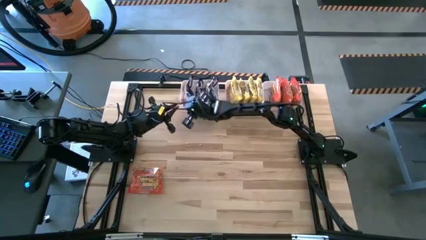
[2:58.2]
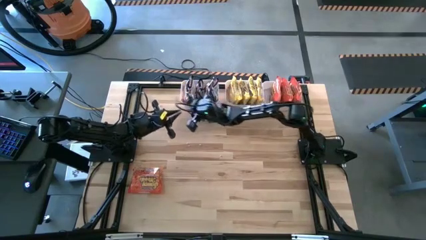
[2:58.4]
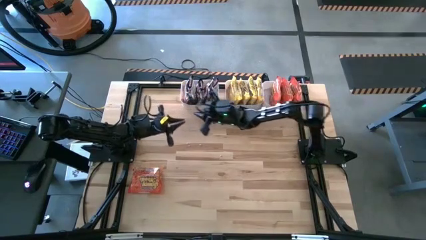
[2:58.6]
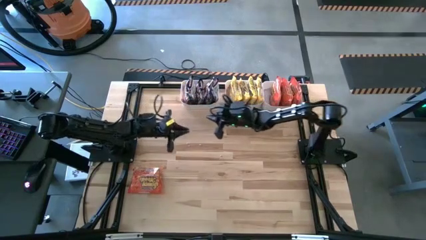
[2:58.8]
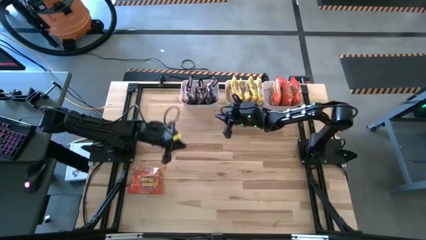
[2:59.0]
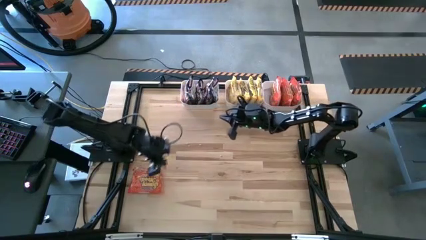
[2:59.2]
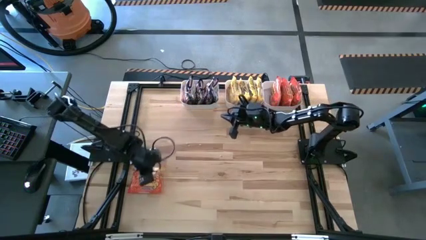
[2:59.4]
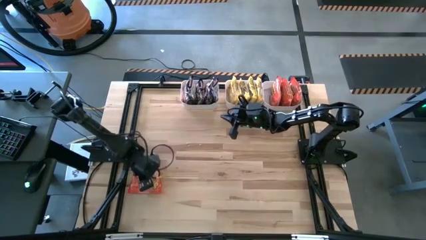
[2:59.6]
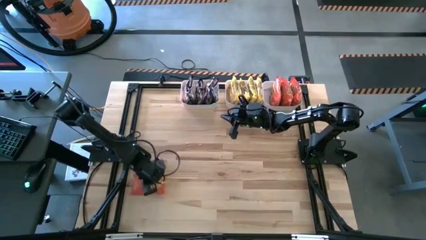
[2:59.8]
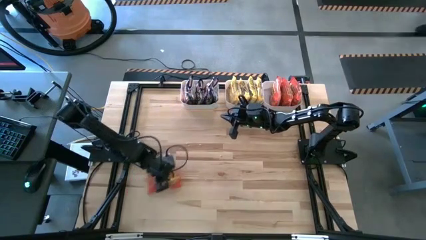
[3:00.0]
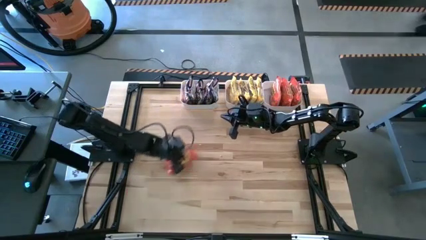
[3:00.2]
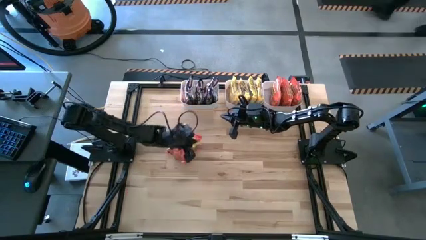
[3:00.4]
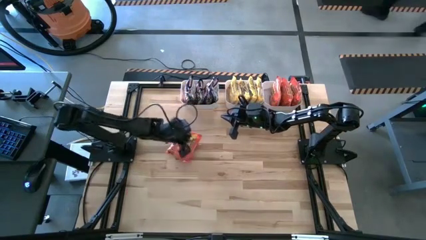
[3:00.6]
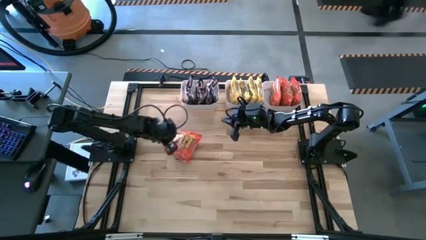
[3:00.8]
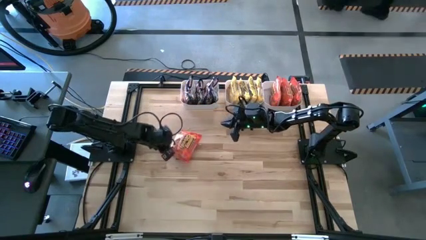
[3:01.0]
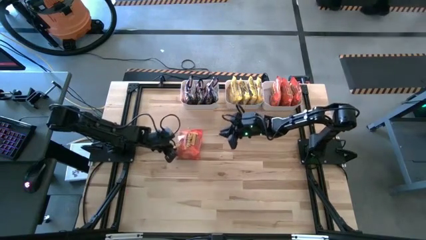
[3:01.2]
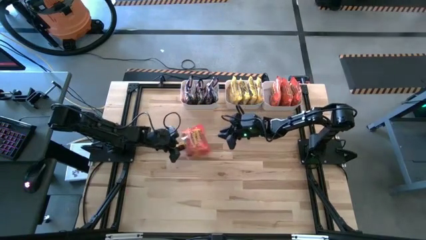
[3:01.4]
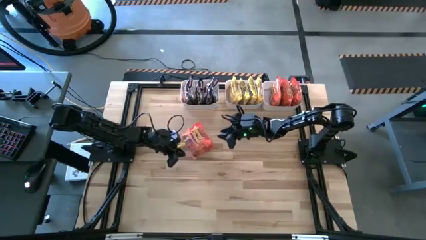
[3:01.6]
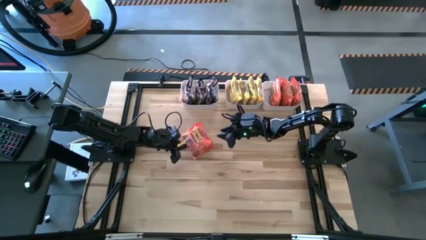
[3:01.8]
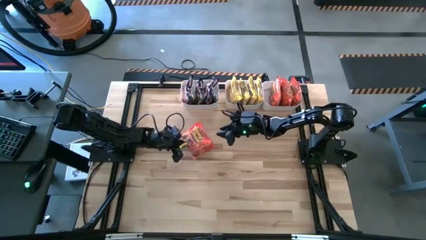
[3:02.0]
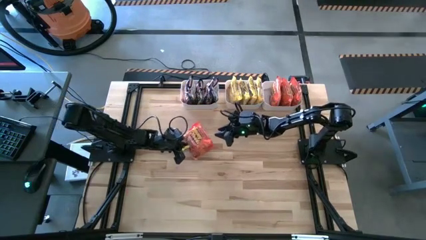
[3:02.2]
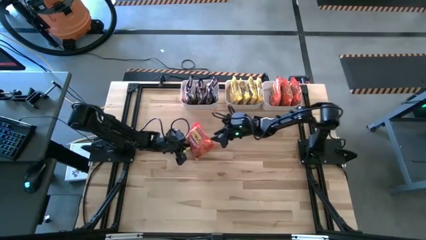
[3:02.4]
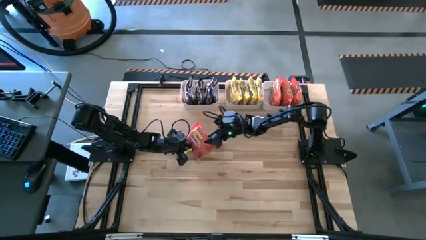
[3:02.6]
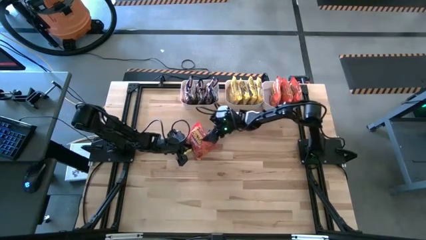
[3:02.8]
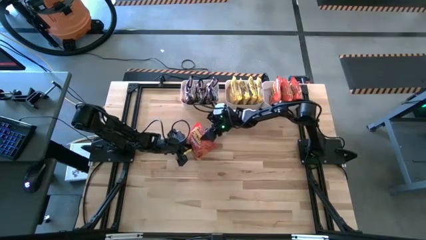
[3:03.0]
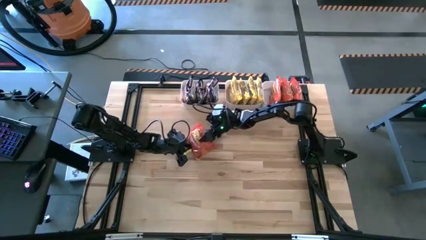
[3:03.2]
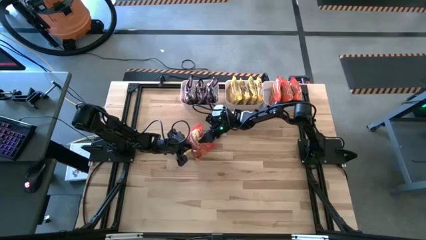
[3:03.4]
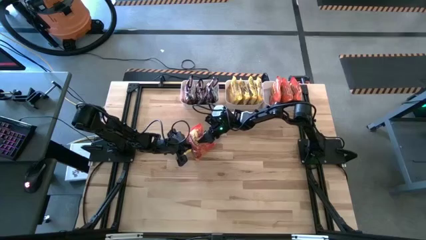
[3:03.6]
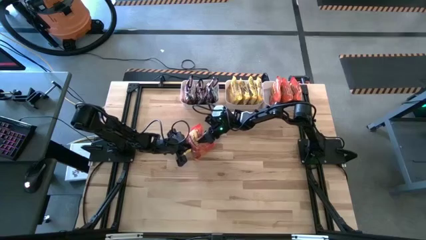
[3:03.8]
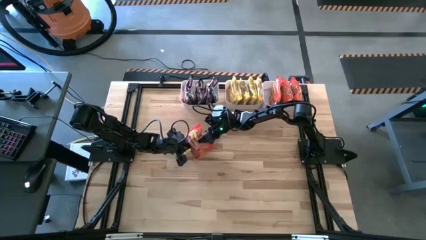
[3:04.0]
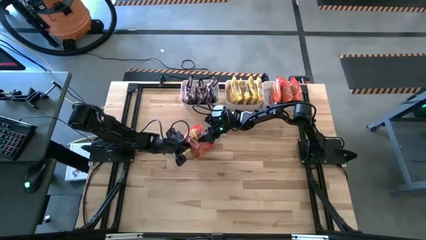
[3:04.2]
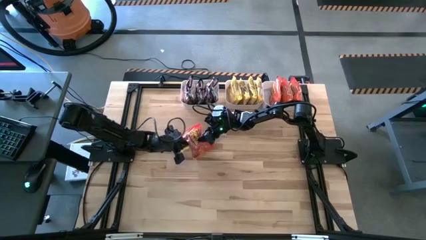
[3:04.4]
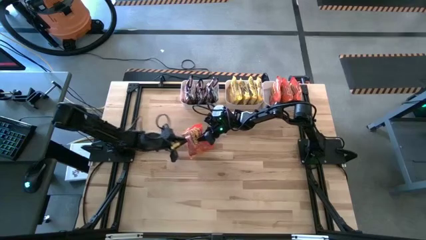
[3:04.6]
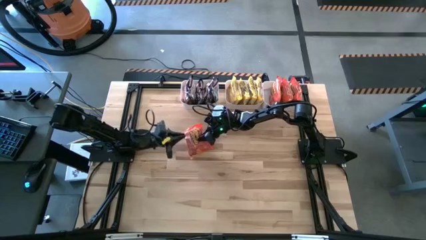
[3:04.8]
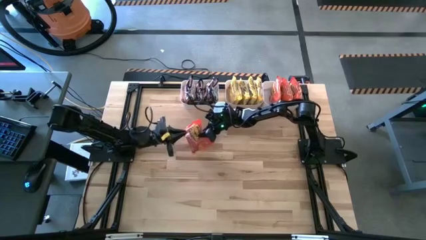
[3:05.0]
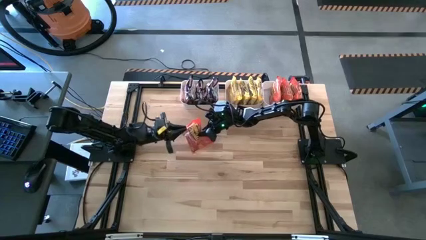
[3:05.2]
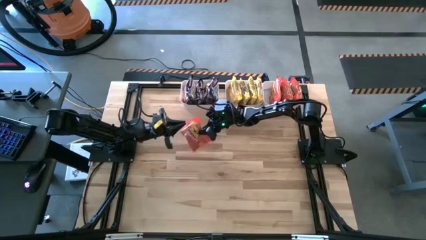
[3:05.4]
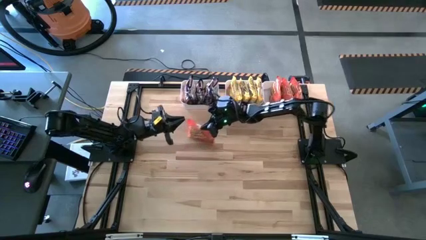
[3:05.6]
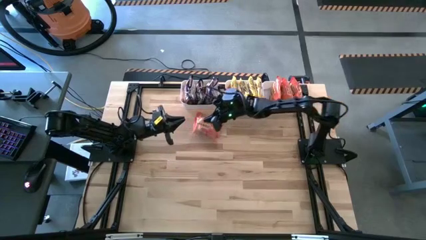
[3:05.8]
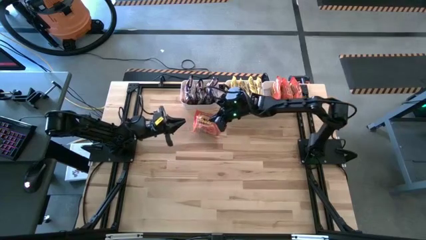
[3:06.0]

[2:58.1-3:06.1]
Task: Sort Maruchan noodles
Put the orange noodle into the right white bin

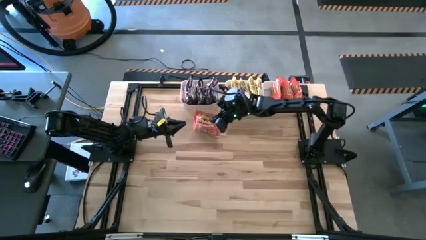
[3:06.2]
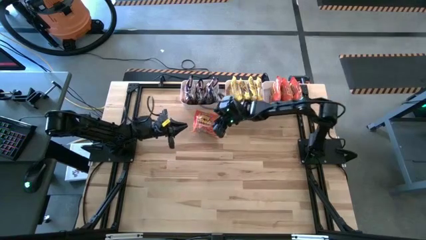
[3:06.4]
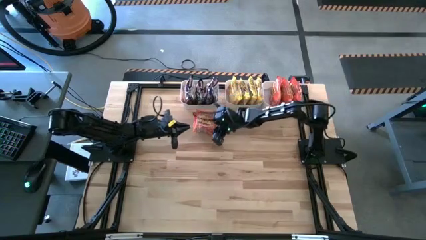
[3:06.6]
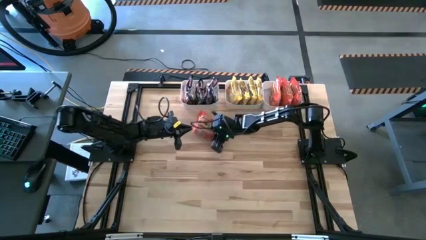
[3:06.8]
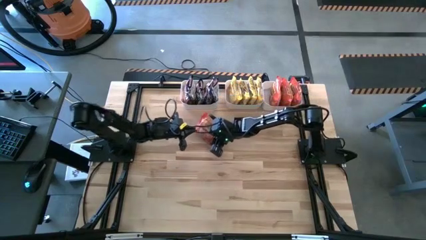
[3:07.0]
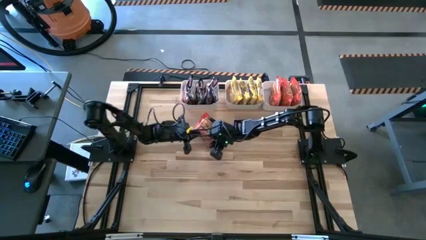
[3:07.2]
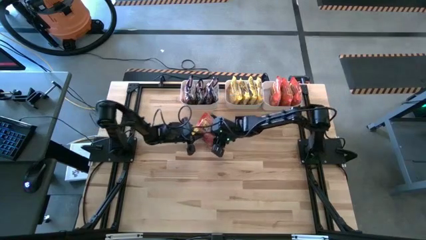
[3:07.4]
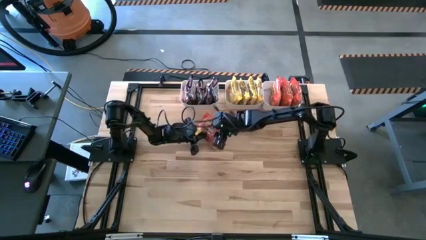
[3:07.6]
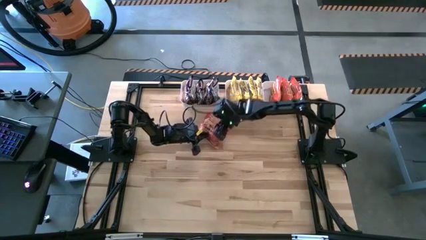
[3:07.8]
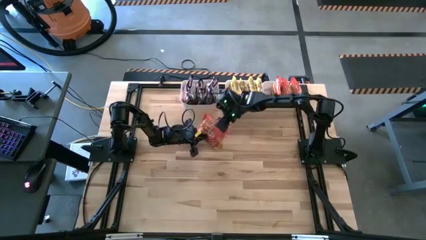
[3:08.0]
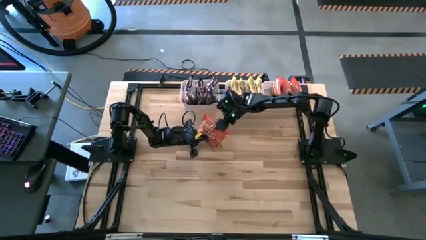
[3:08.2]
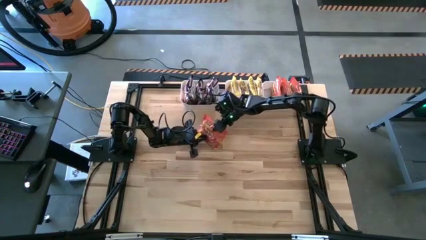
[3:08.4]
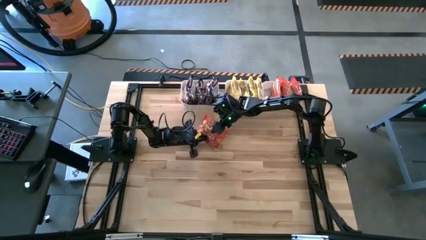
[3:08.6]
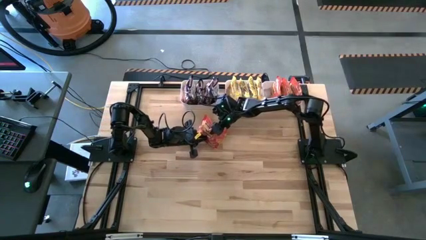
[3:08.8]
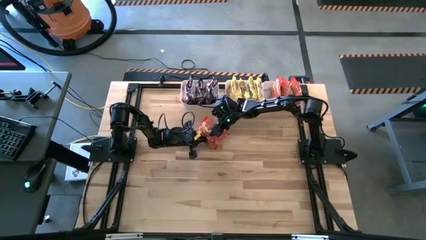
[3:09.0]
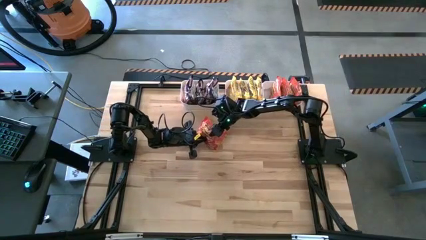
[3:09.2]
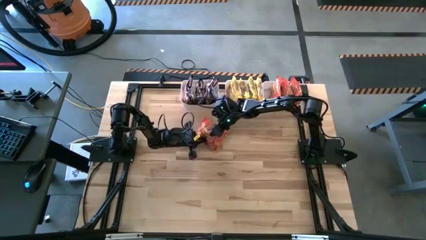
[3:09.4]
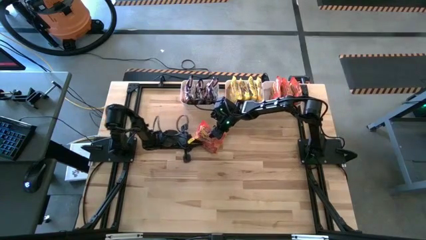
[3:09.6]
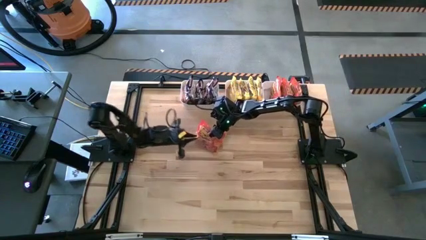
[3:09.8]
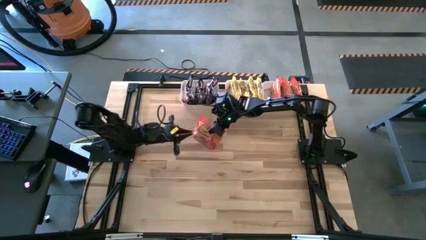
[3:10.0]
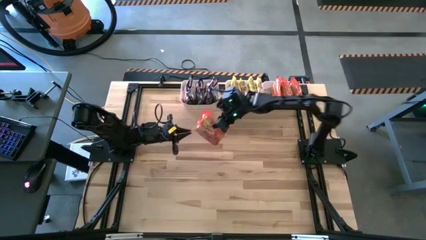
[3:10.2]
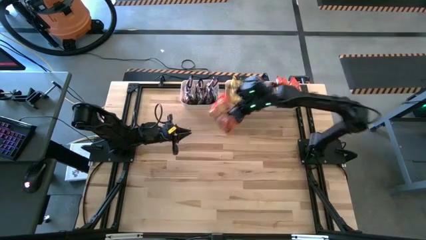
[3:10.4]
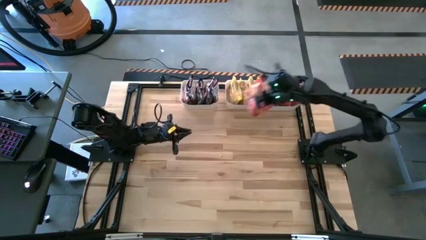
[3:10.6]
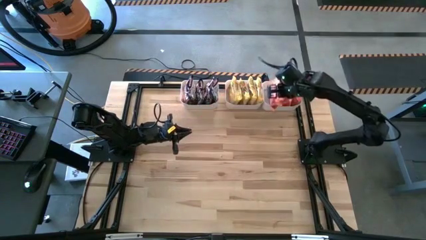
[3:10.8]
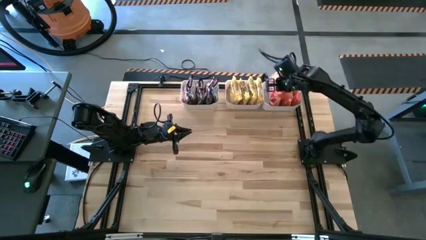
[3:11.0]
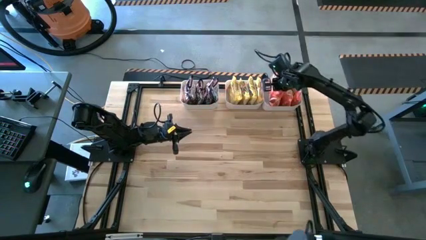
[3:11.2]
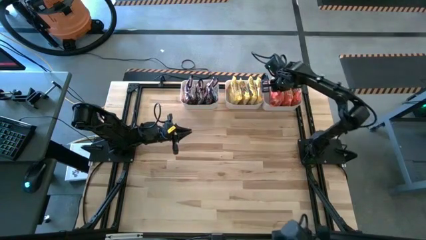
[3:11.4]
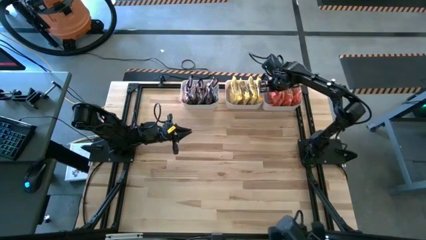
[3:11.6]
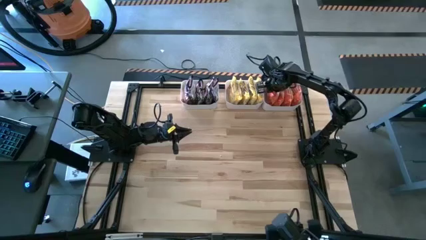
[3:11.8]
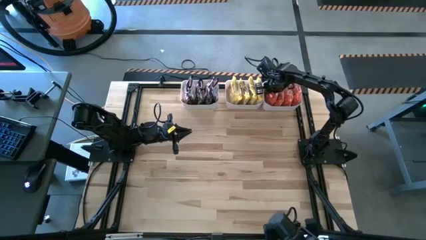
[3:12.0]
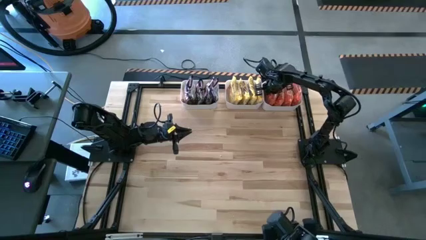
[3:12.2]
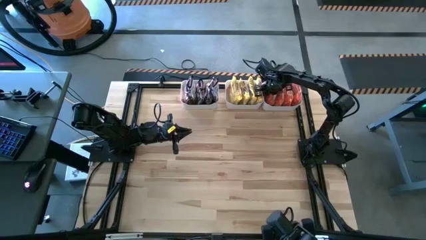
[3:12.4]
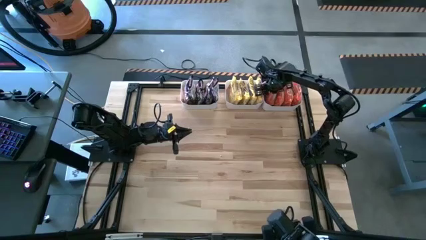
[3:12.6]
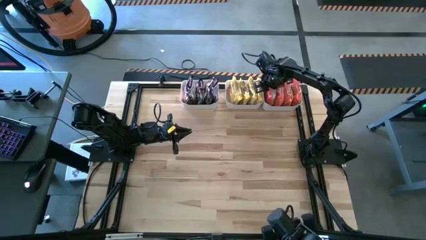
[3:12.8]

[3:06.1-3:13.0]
Put the orange noodle into the right white bin

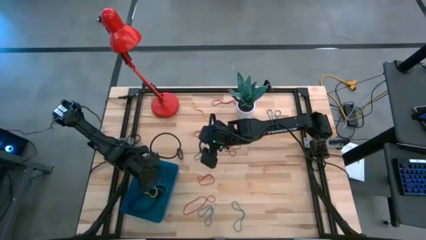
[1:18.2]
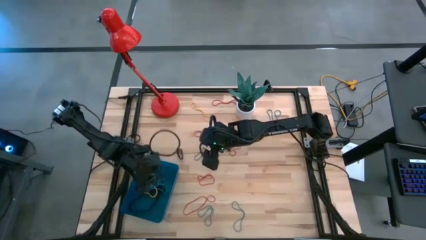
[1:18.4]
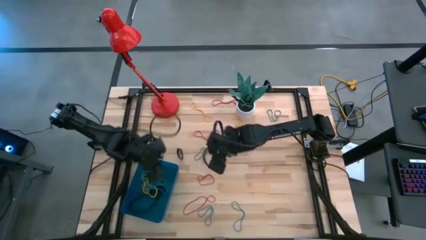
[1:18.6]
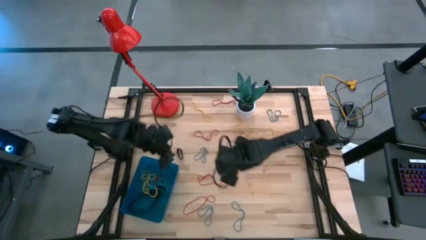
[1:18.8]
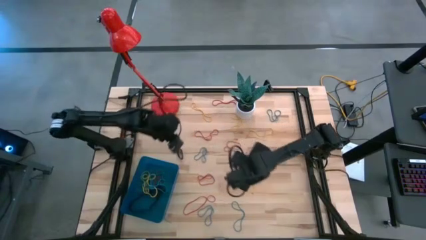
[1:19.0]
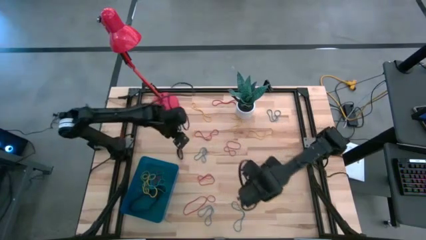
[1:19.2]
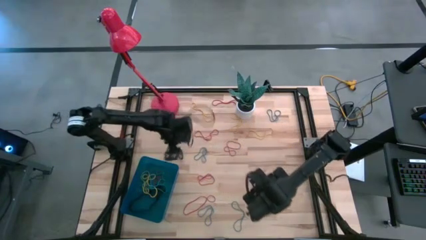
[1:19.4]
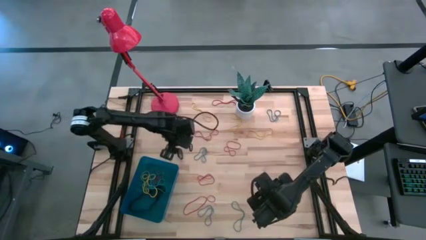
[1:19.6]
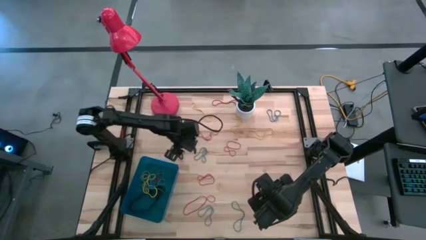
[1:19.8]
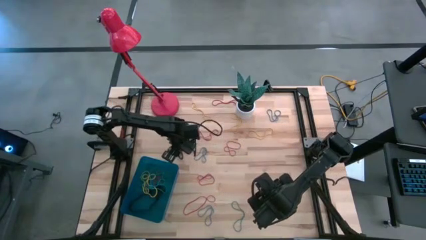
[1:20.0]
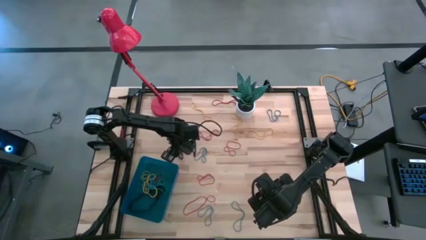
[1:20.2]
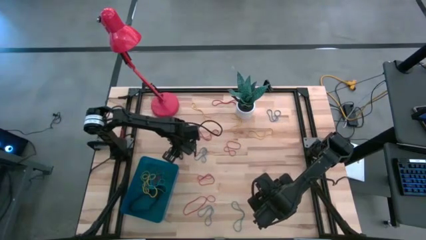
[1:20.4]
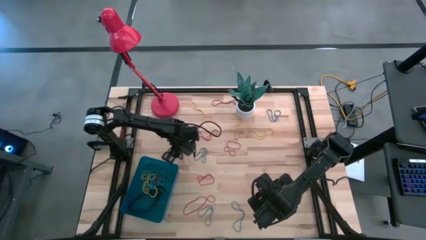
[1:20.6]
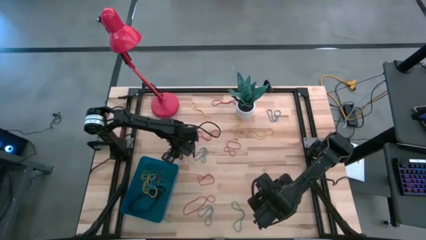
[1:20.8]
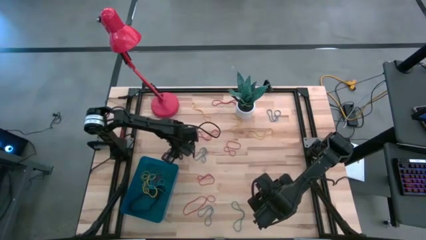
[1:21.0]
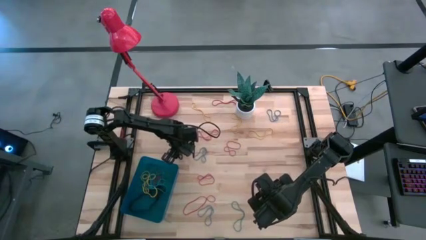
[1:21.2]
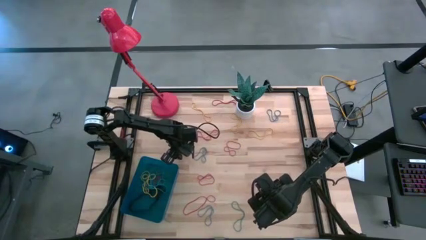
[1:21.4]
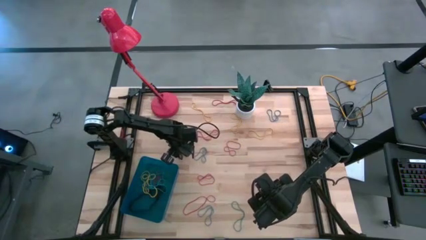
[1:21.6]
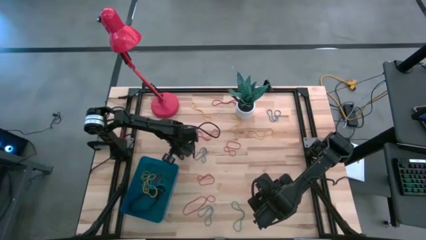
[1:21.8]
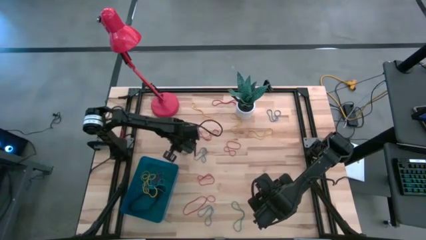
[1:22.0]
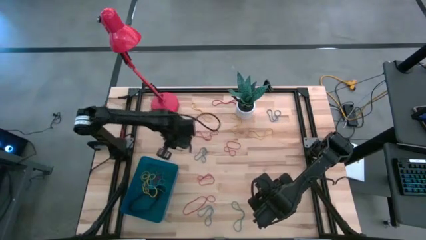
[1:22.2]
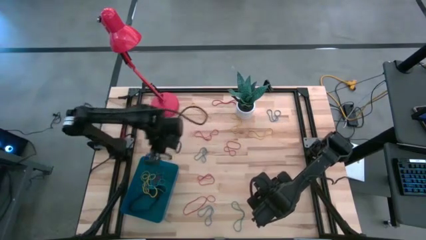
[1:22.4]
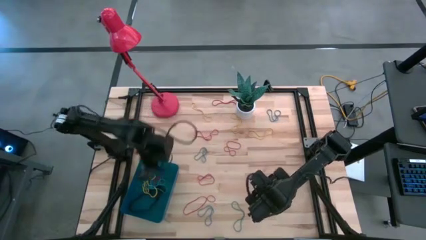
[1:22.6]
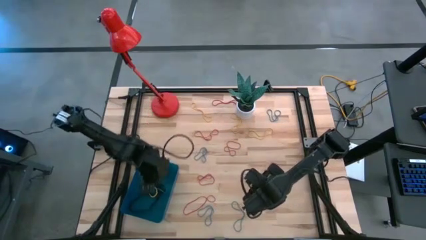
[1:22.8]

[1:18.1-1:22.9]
Task: Pick and place rubber bands into bin
Put the black rubber band into the blue bin
